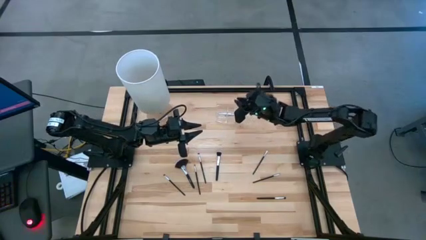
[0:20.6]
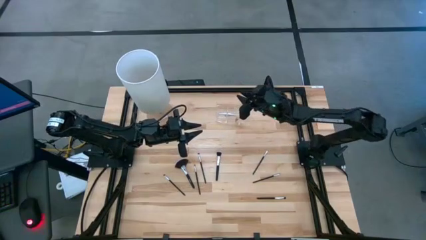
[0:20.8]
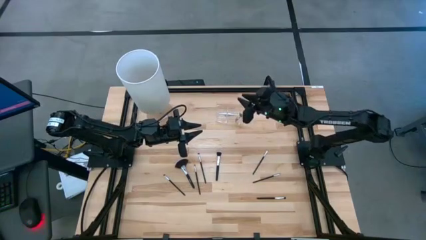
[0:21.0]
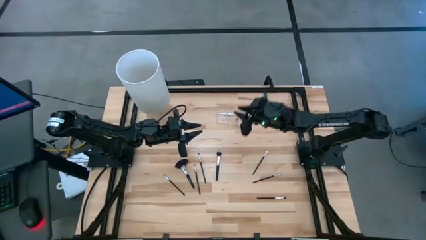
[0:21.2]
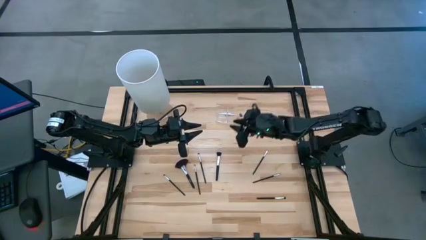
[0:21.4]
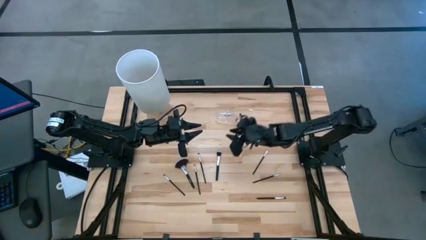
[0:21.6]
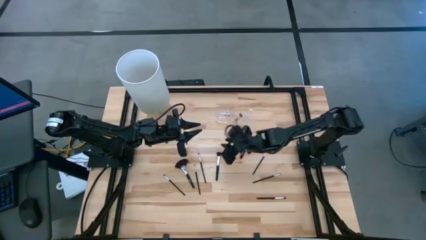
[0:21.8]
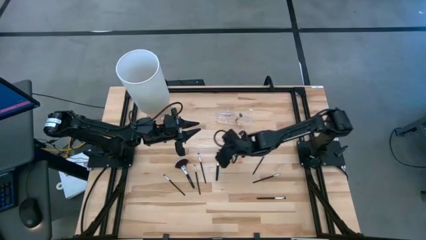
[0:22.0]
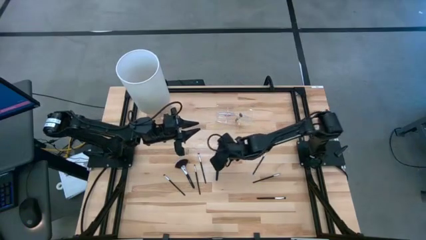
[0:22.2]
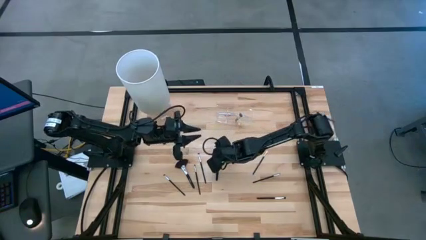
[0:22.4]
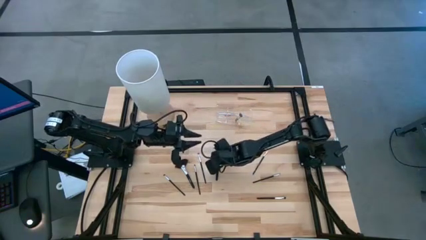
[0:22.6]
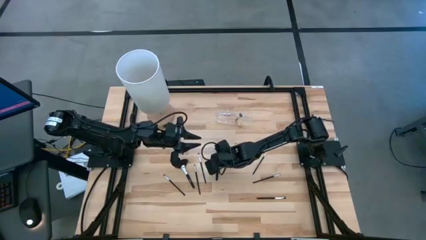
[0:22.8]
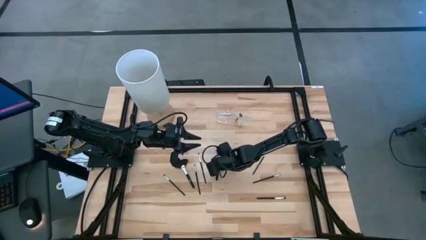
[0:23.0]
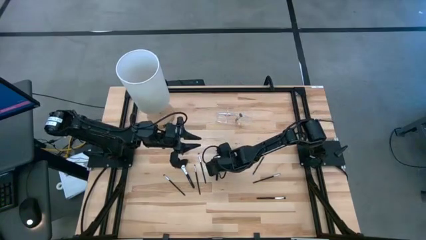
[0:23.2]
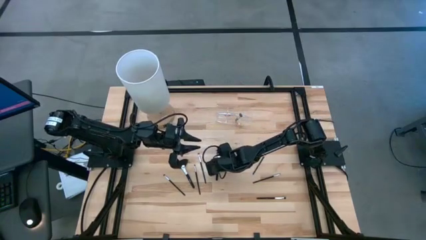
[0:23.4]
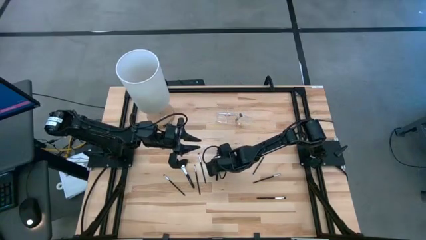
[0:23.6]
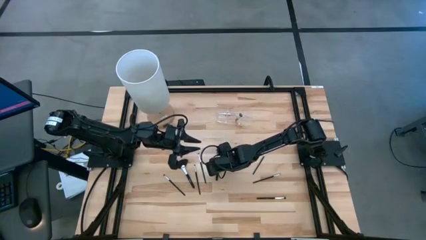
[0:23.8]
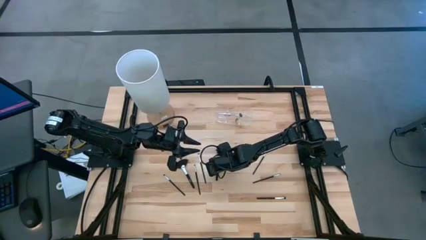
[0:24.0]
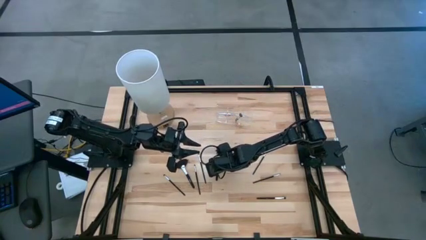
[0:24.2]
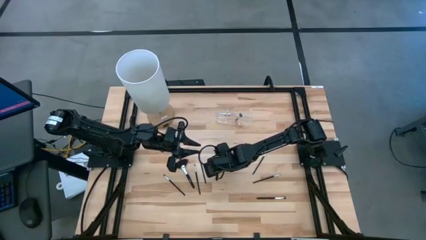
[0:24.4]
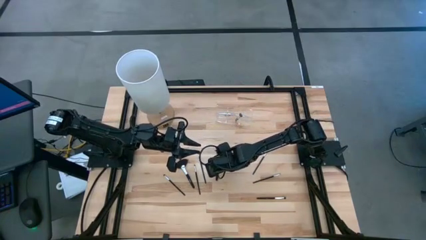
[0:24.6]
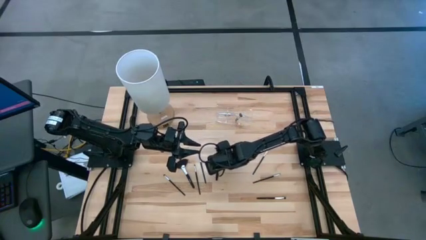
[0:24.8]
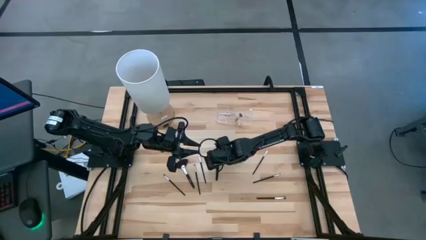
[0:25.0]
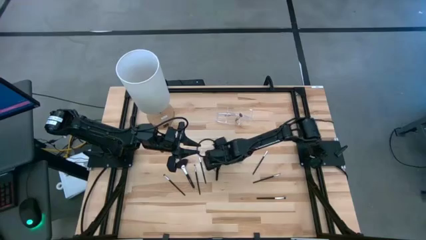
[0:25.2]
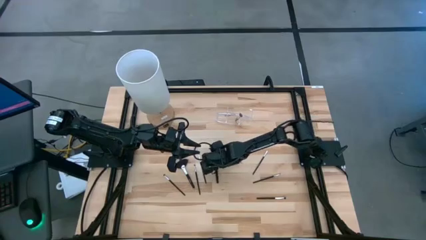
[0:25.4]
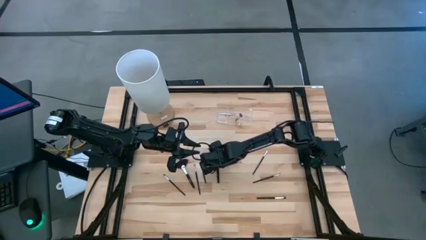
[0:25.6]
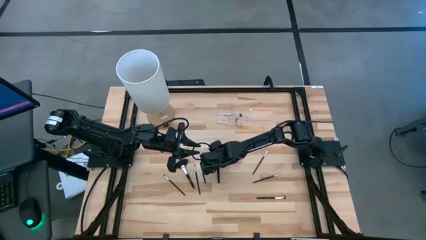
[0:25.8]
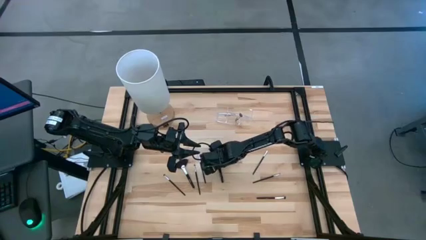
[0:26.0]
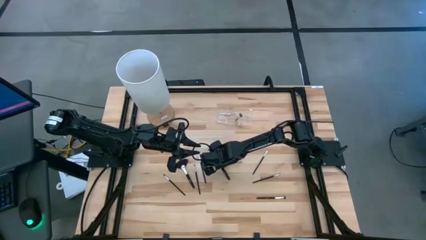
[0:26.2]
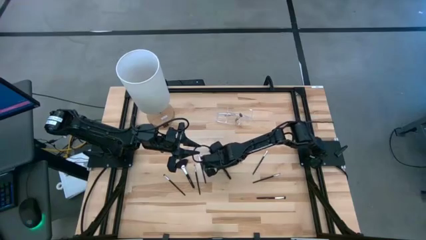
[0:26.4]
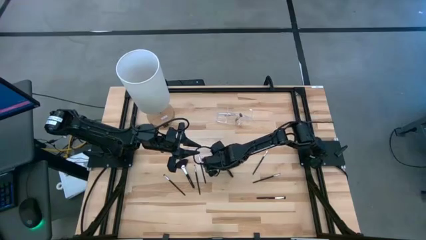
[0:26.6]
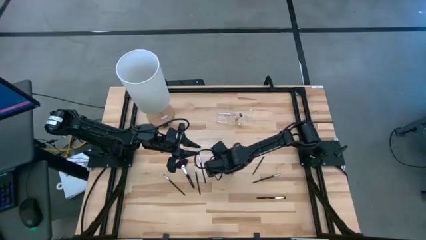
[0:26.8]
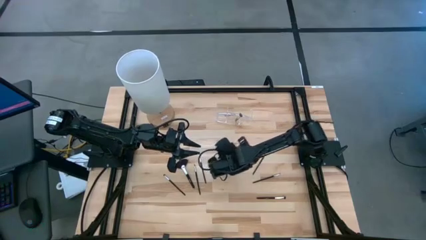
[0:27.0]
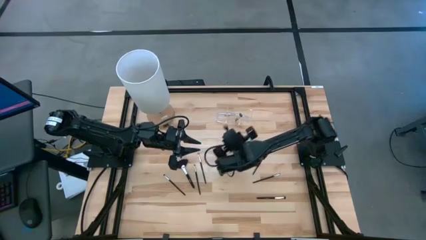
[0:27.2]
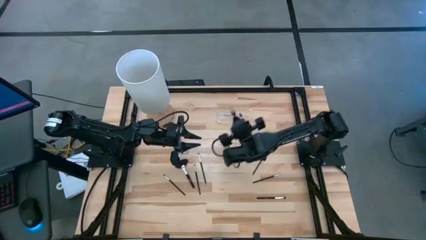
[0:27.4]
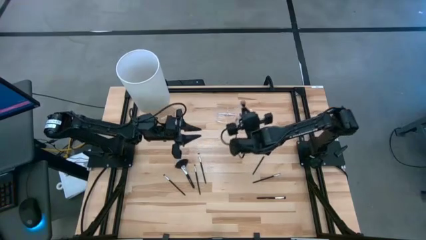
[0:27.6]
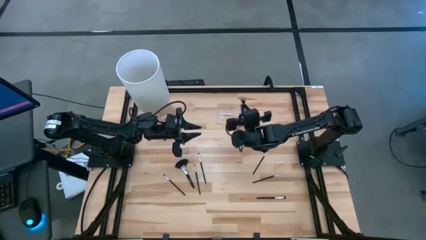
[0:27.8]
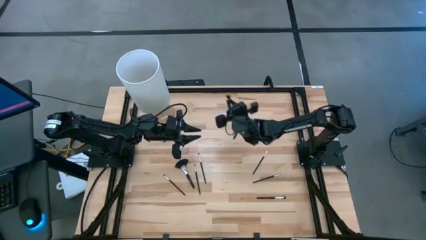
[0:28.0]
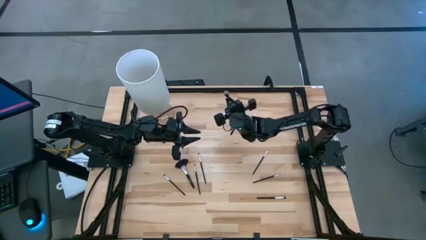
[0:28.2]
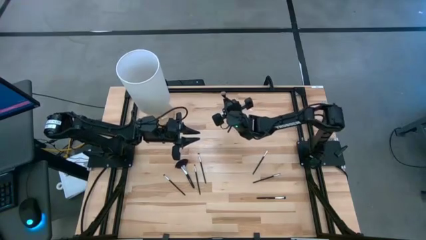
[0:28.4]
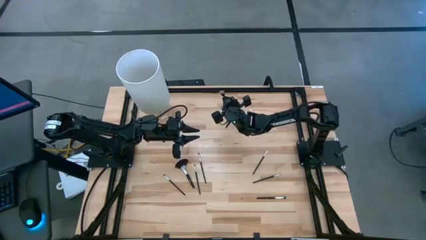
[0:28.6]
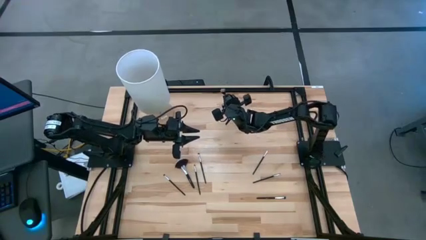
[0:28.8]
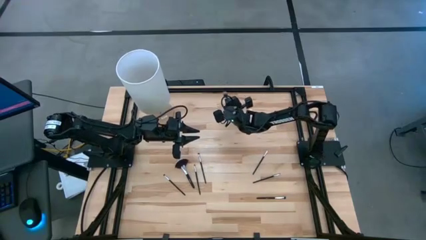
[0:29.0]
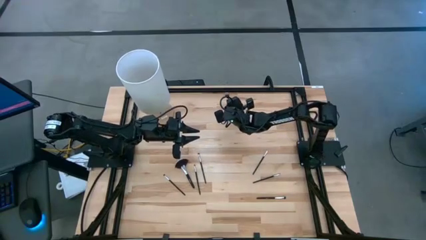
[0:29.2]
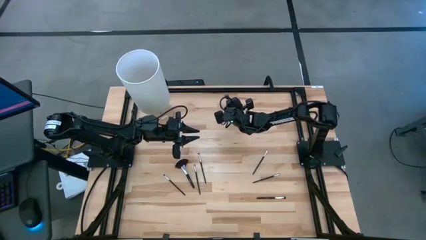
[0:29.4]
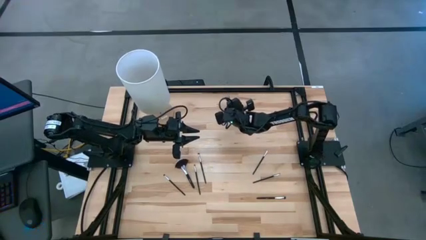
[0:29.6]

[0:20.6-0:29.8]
Task: Put items in baskets/containers
Put the black blush brush into the transparent organizer

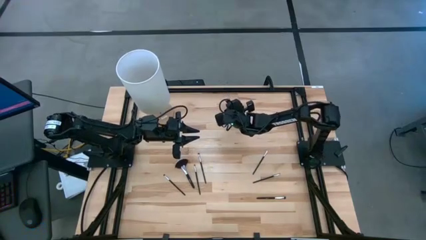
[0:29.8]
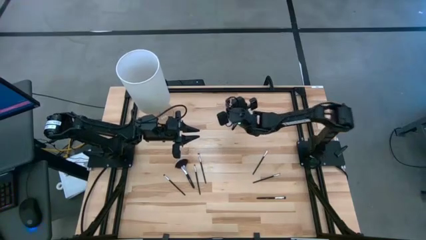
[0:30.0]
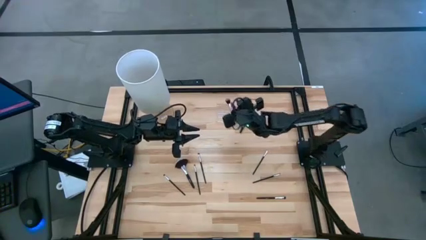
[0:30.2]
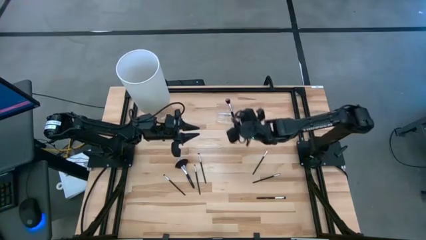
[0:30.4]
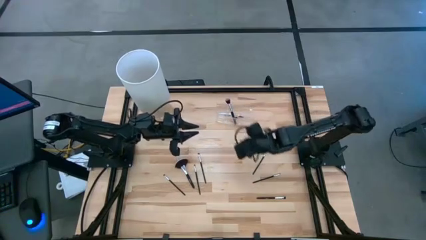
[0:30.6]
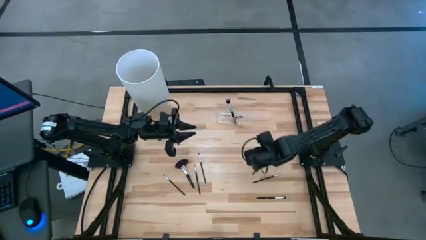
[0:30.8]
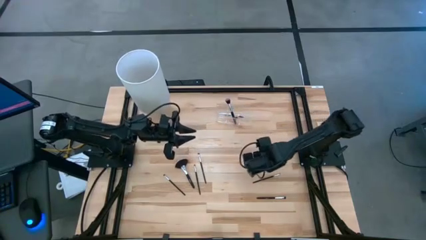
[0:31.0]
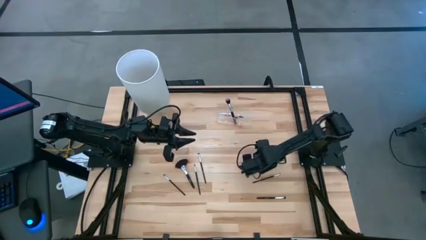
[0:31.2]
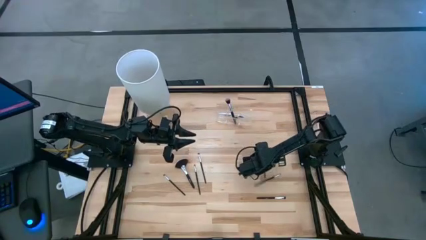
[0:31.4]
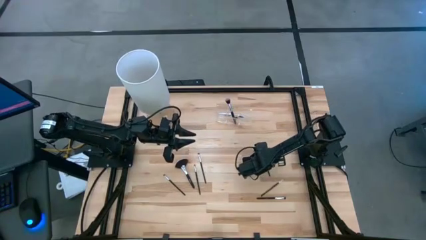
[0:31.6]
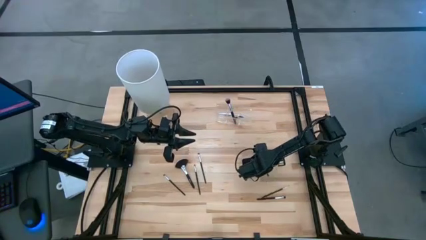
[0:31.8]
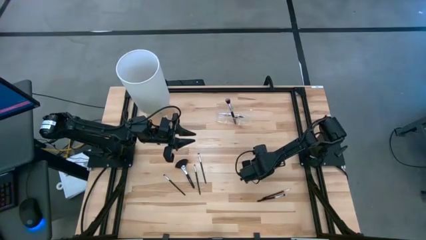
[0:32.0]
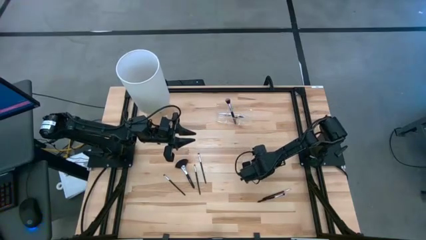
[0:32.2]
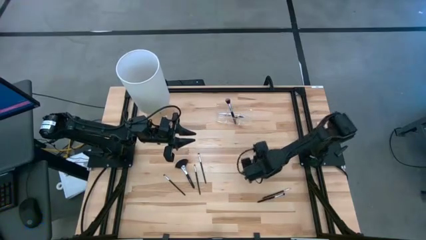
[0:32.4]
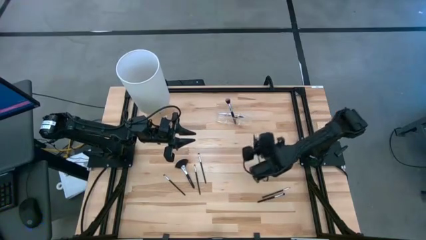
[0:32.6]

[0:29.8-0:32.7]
Put the black eyeshadow brush into the transparent organizer

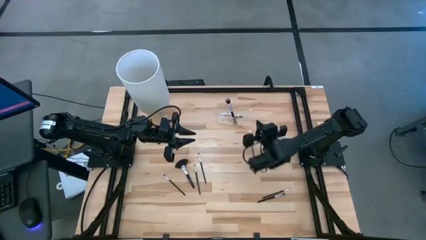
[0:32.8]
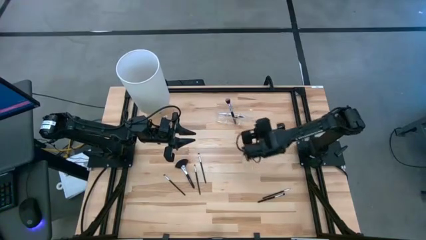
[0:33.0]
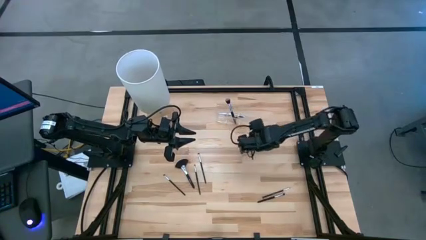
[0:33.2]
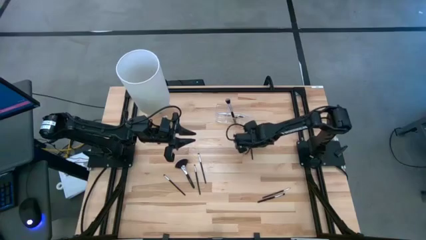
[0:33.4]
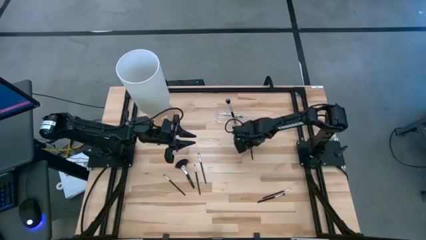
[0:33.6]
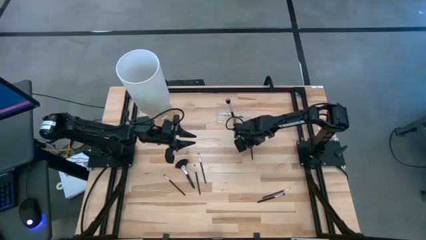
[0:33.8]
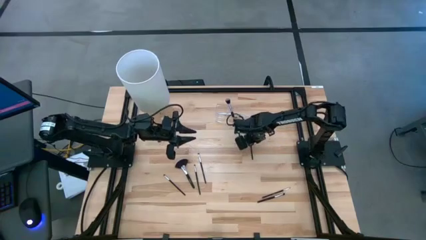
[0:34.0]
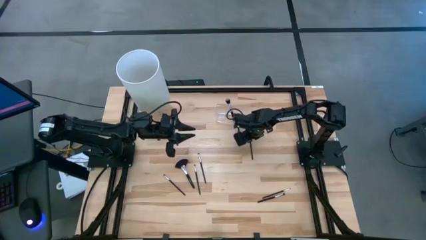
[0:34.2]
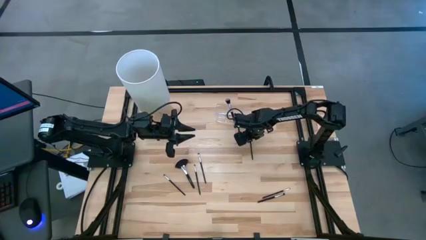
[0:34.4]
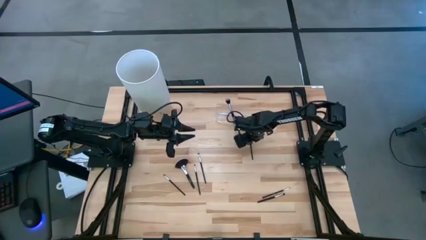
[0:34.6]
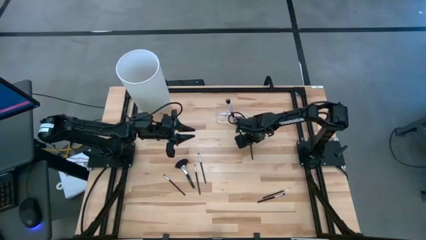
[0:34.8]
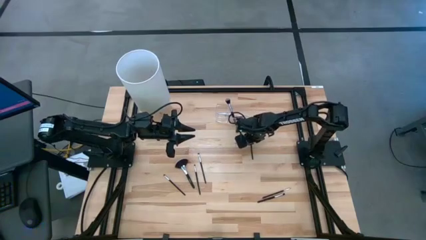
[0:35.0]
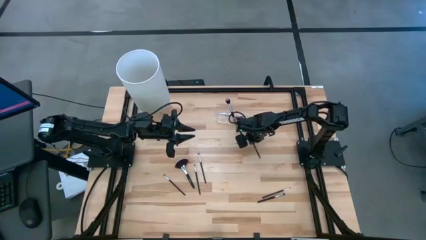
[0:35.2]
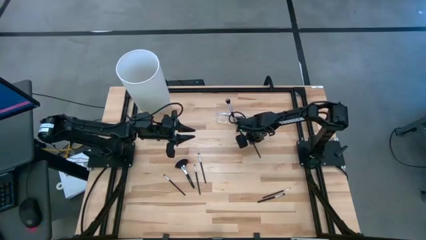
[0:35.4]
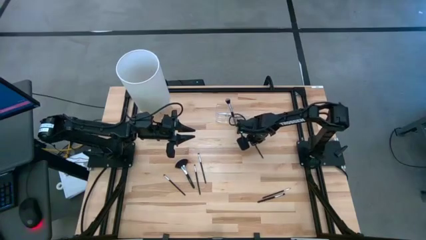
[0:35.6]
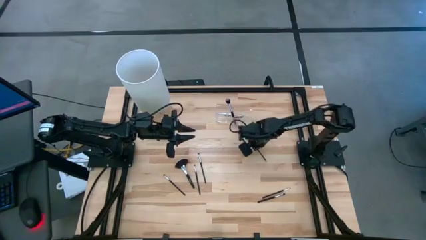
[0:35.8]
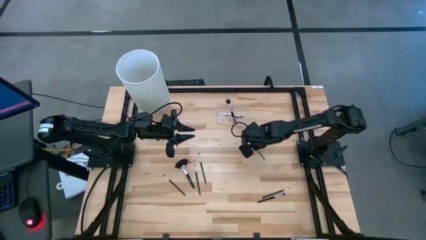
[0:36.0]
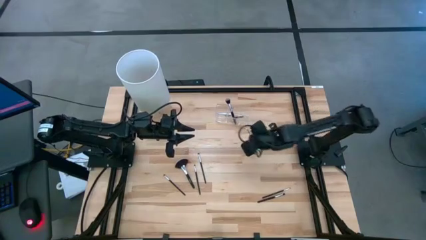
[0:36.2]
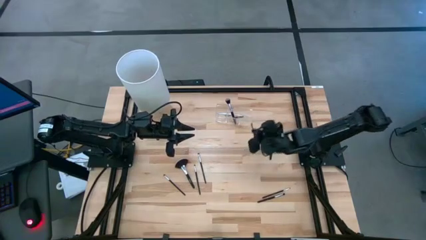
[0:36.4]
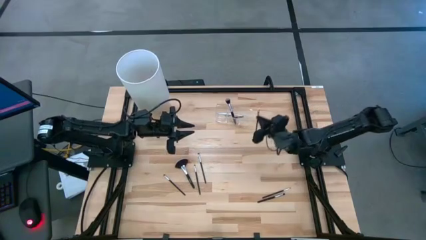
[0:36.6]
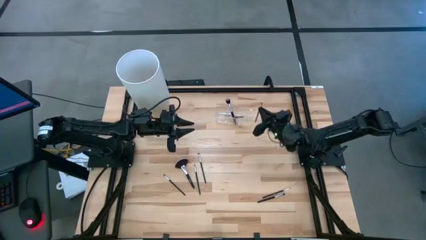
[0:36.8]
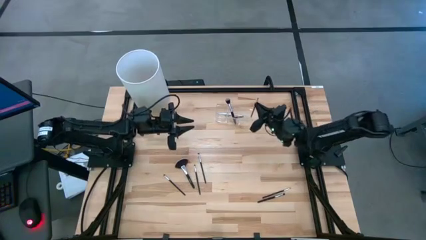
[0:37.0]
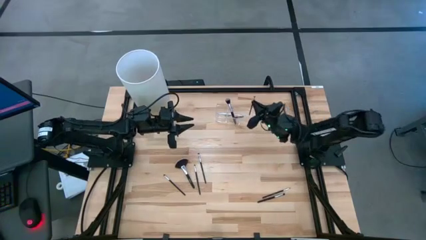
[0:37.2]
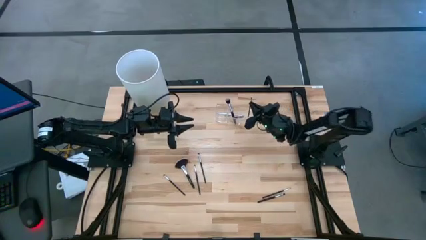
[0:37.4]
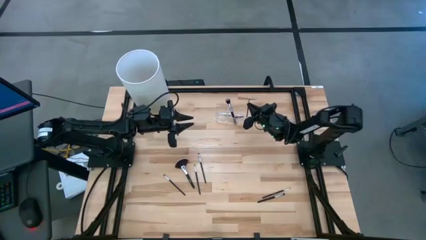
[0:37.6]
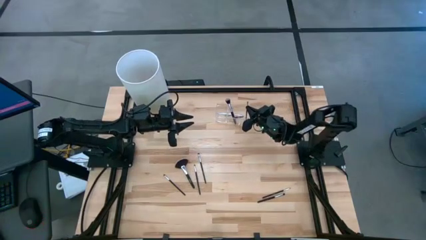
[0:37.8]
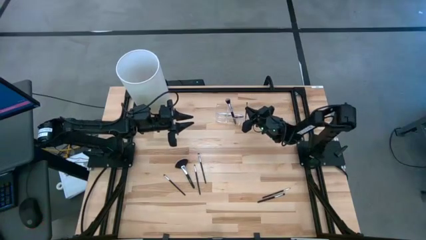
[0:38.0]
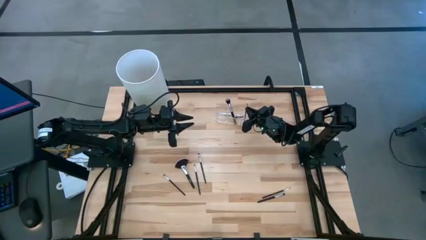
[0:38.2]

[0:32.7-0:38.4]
Put the black eyeshadow brush into the transparent organizer
